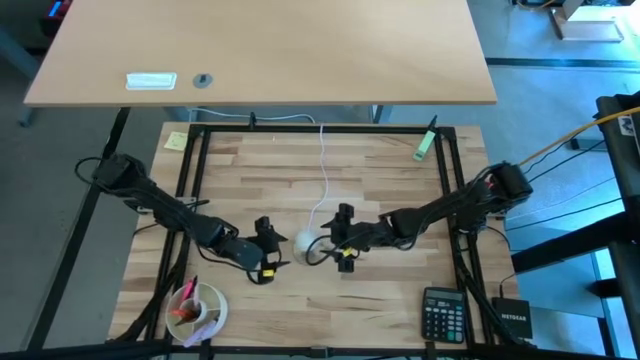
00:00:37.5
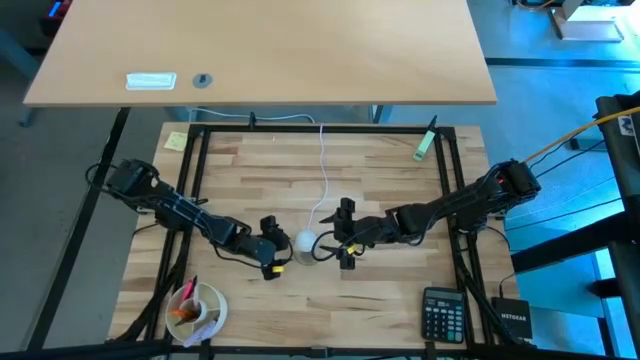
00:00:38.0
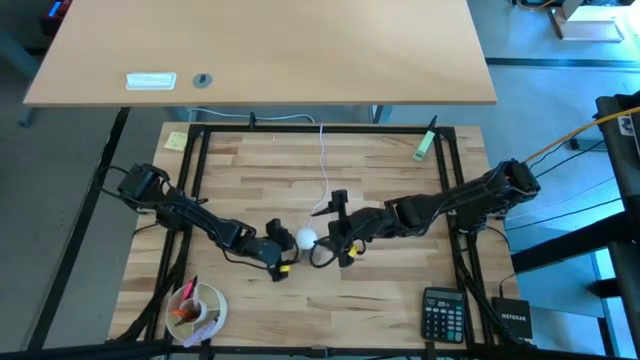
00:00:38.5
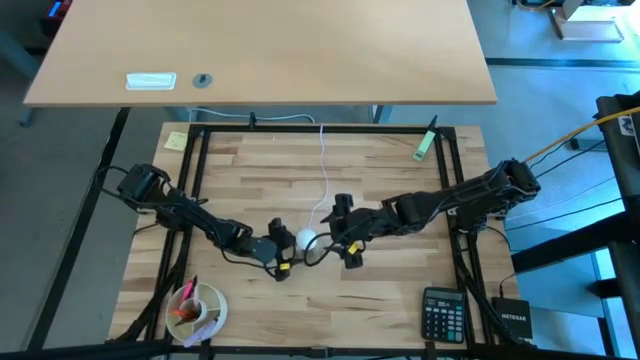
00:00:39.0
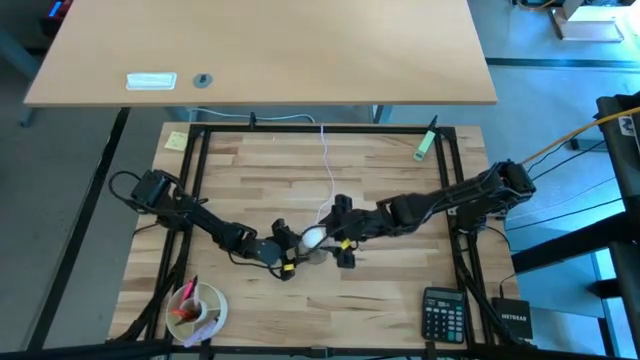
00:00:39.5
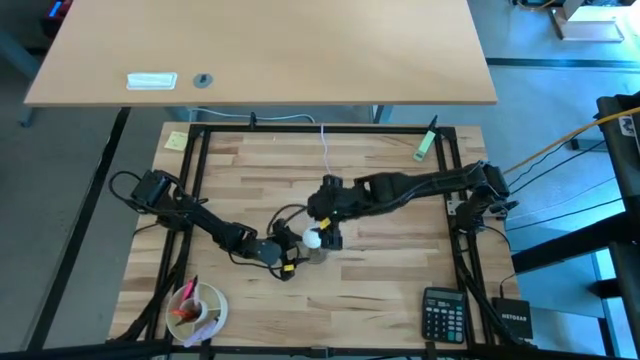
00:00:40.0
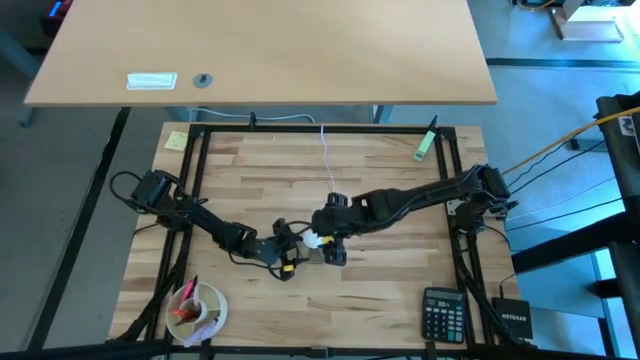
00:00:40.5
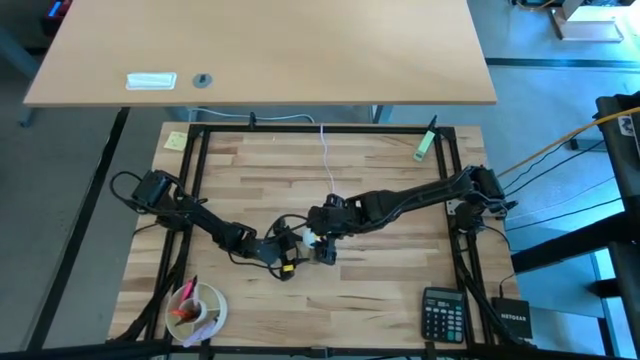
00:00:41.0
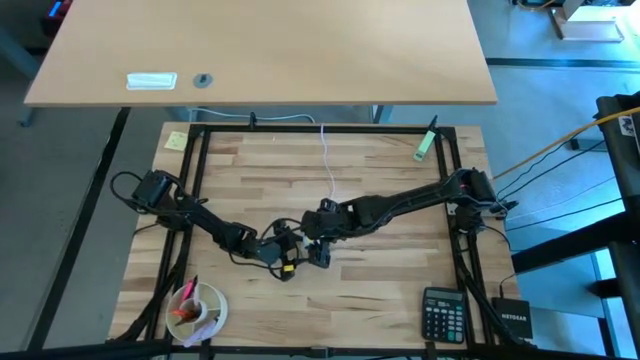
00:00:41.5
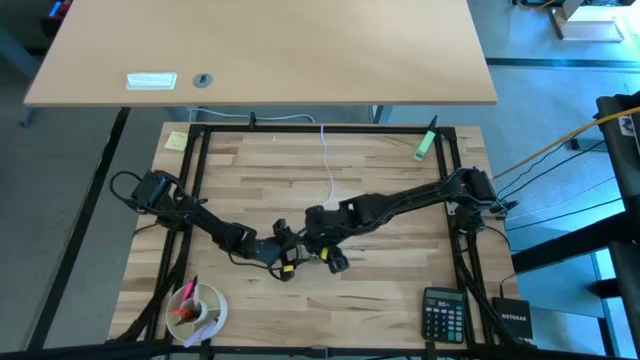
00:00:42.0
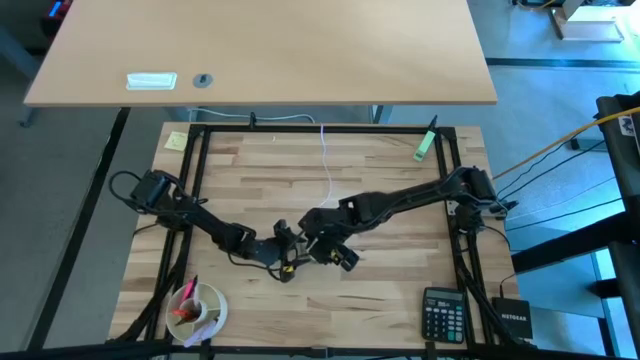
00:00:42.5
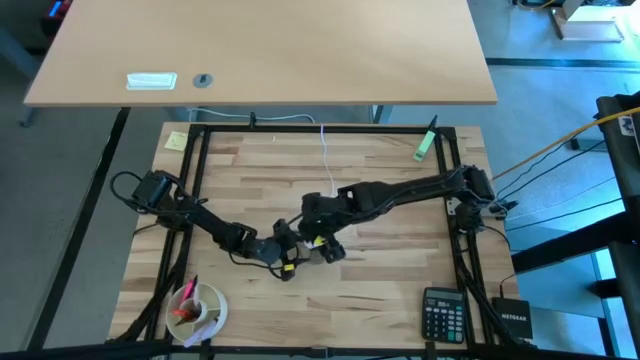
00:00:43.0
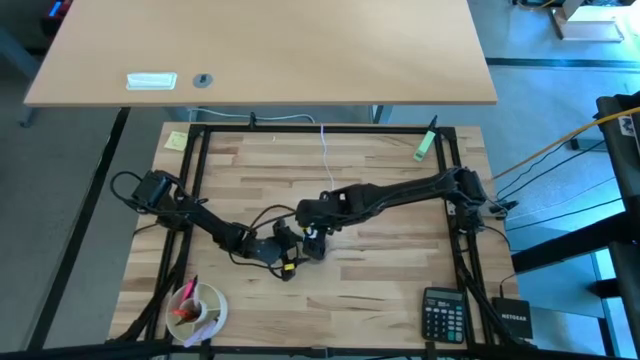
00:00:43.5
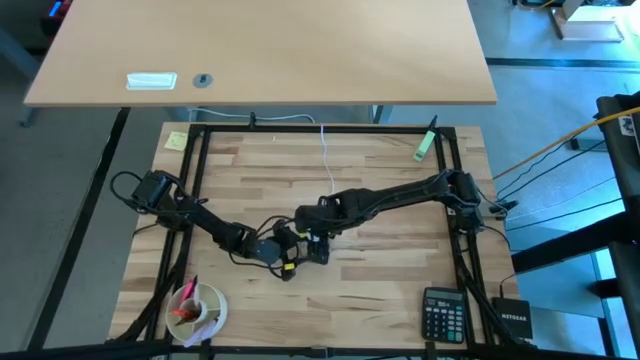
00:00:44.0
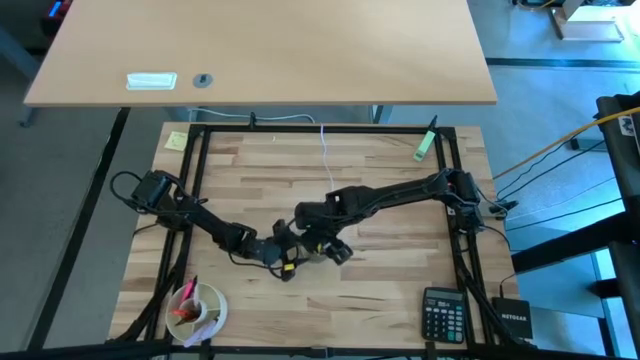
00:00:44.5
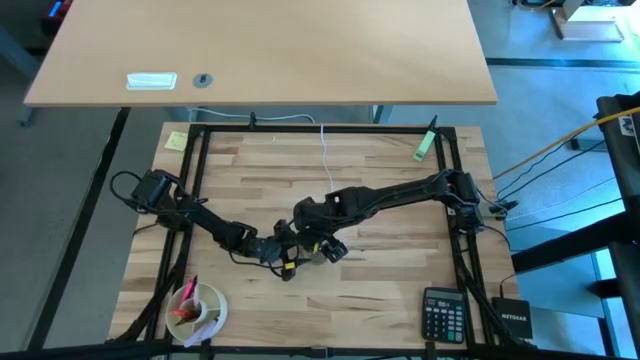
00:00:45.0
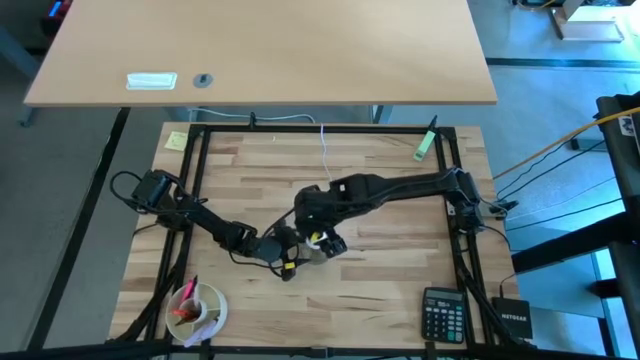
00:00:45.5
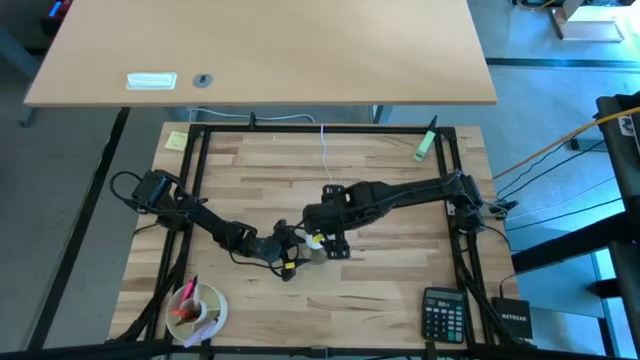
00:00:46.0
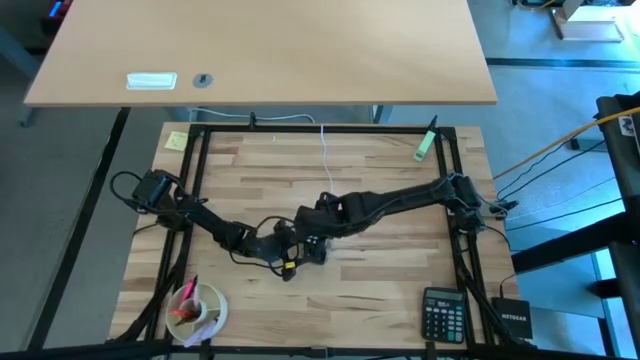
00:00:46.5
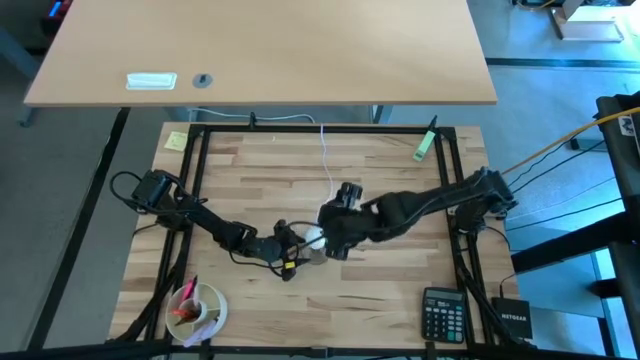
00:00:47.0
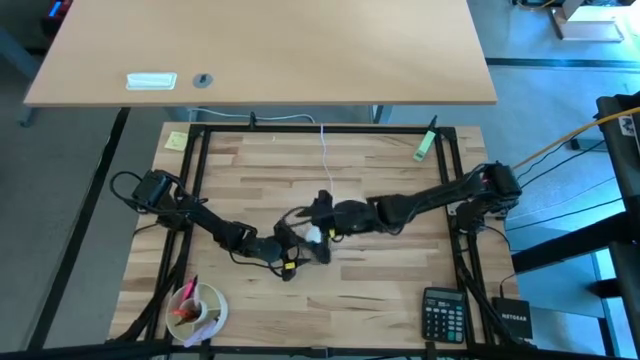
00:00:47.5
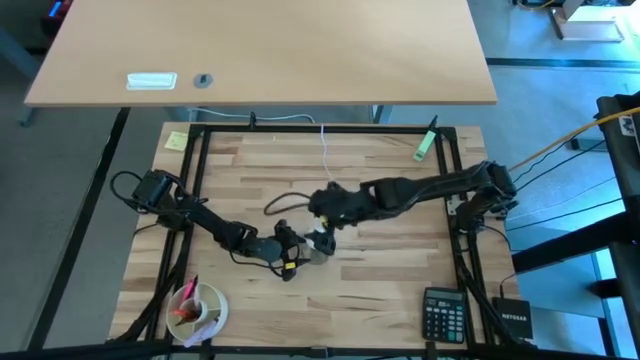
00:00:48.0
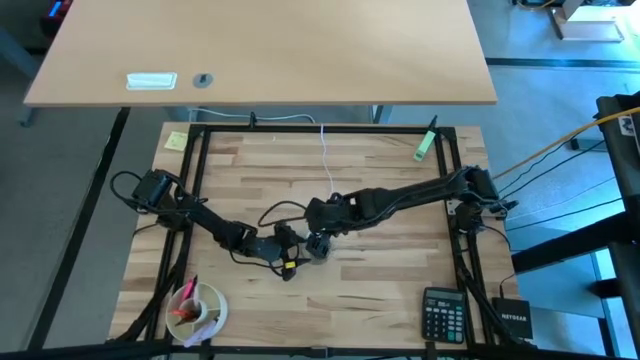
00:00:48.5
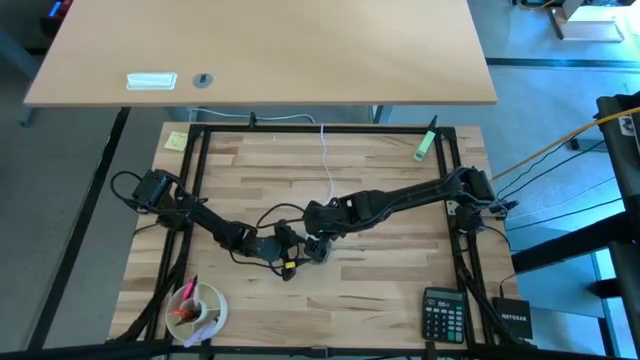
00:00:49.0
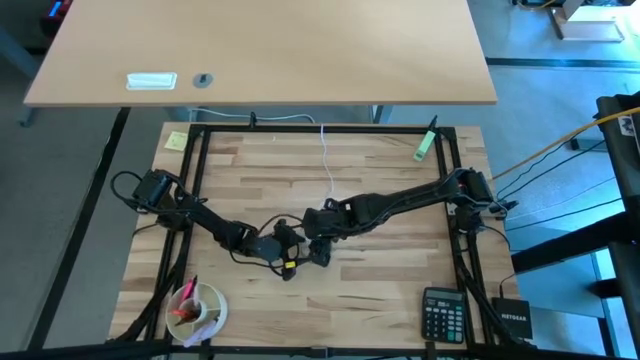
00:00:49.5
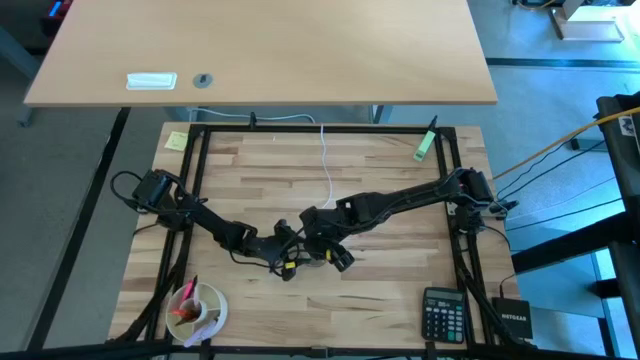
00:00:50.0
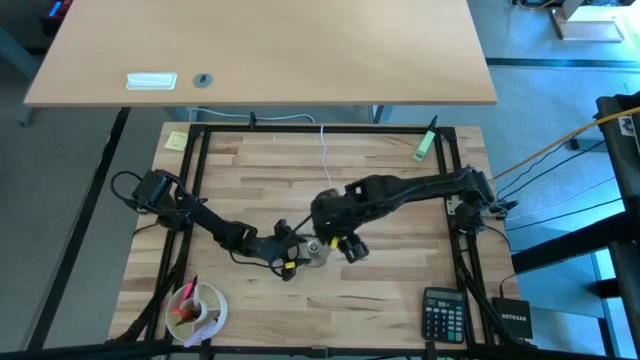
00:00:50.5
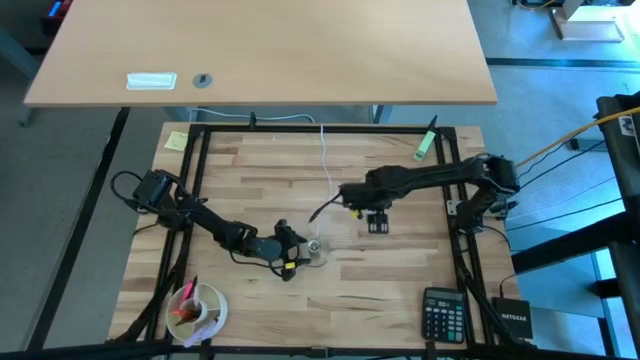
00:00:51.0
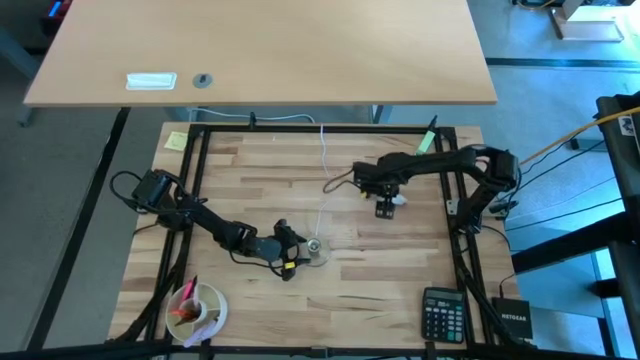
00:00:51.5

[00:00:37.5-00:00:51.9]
Task: Screw lightbulb
Remove the white lightbulb from the silver lamp

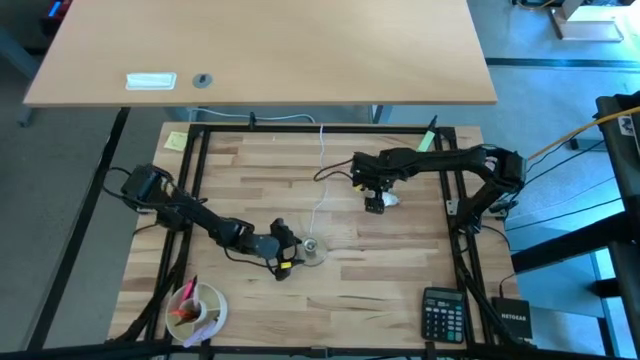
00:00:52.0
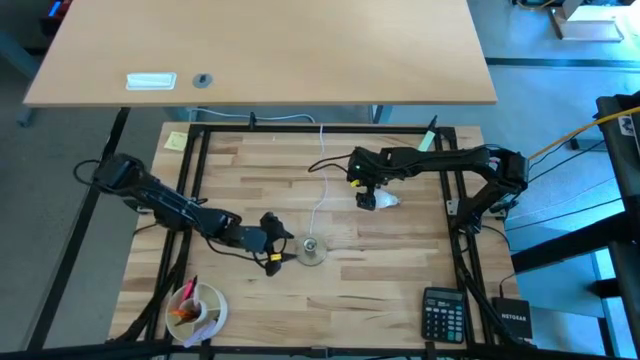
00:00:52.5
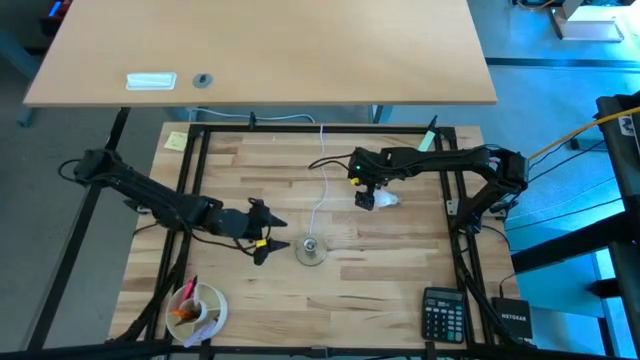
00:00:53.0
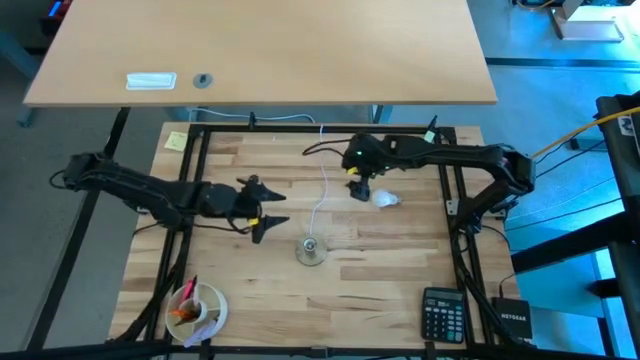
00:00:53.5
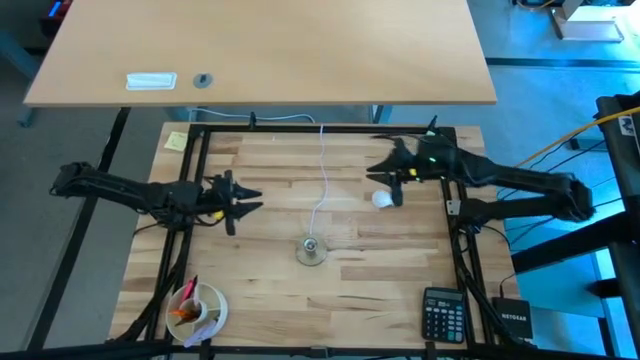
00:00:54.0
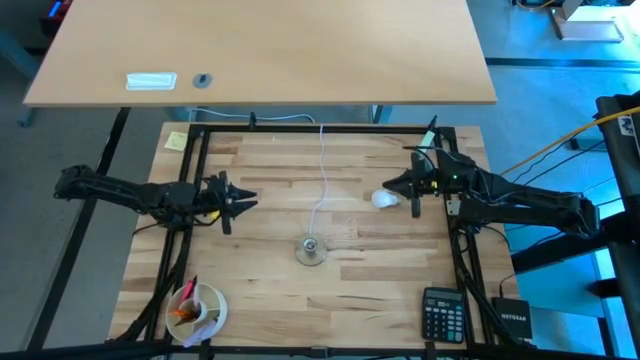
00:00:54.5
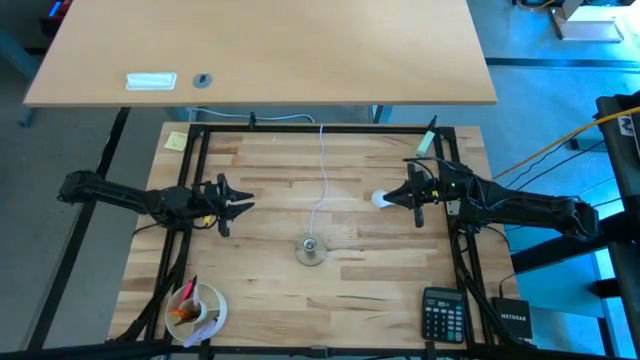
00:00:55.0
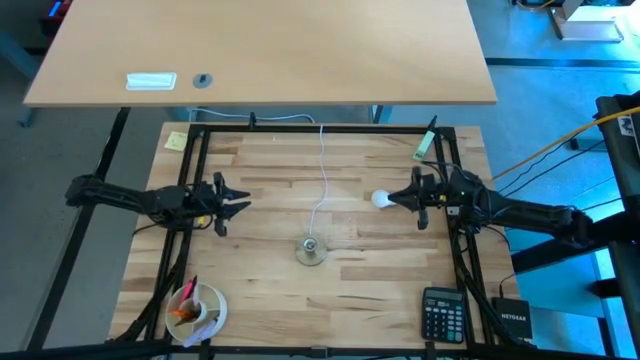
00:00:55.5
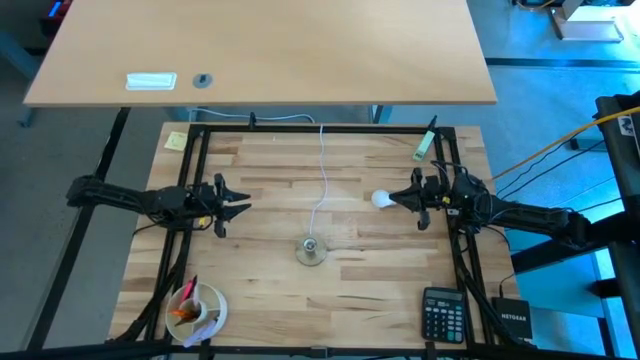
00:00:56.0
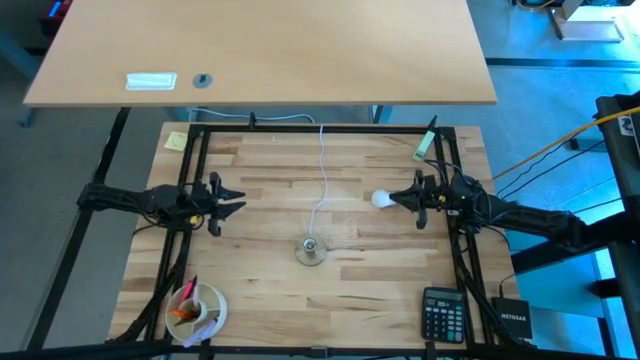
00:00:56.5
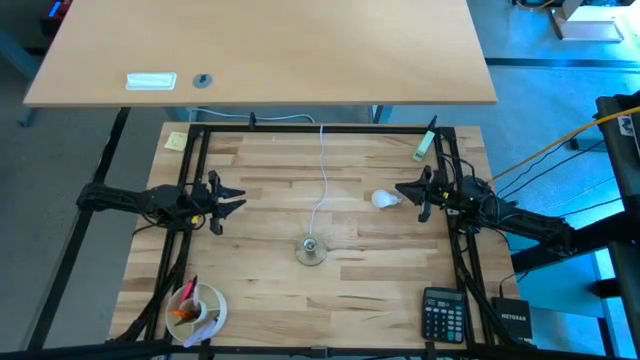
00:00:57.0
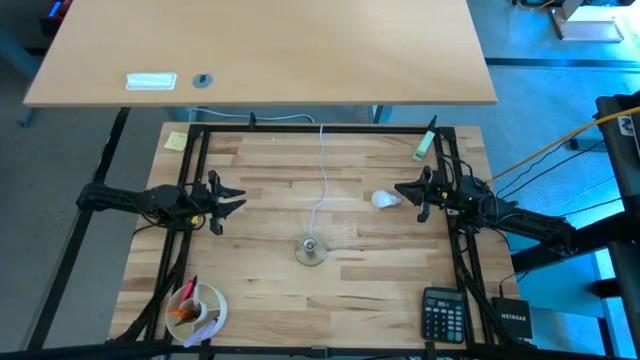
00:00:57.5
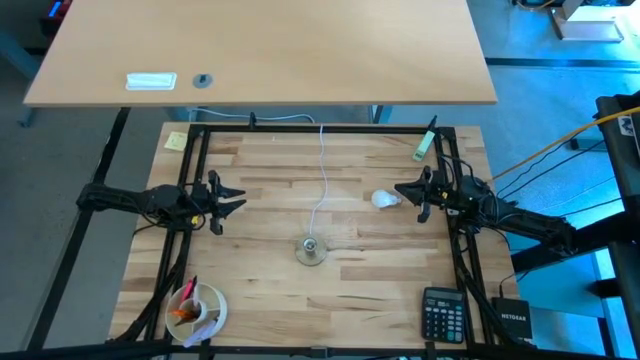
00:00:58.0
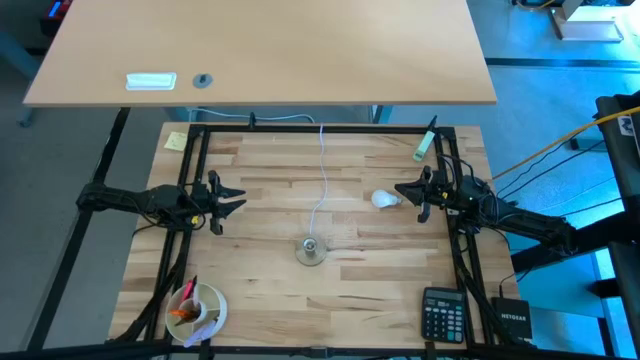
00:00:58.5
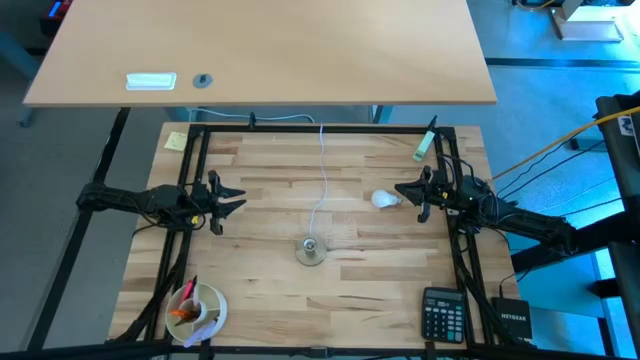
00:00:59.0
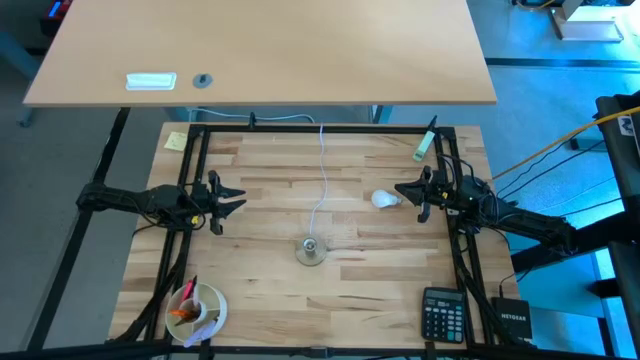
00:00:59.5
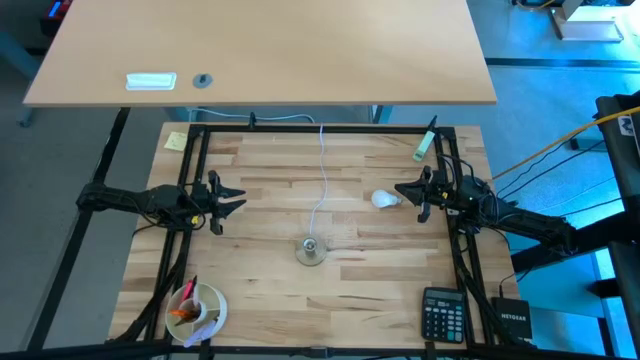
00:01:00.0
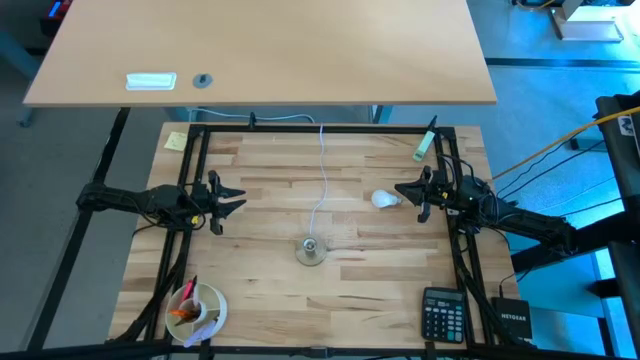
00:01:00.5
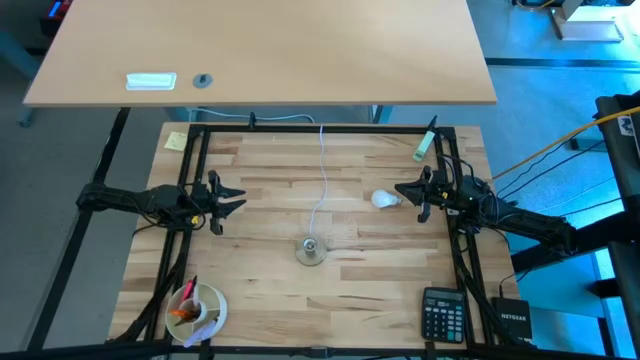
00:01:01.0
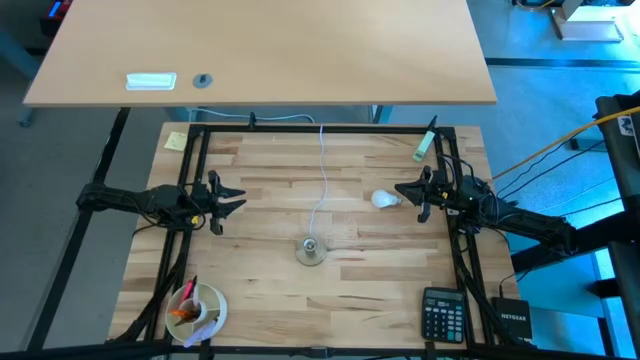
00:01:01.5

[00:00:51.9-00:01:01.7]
Return to Home Position
